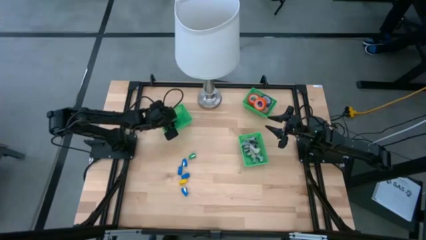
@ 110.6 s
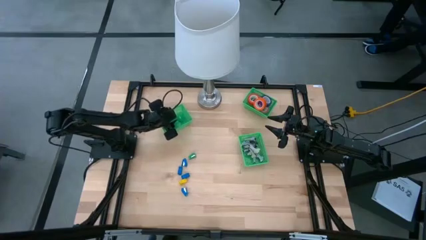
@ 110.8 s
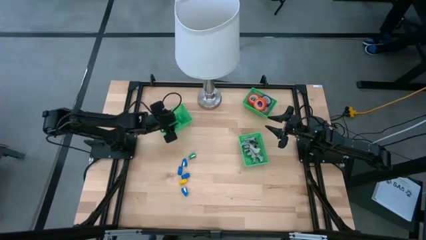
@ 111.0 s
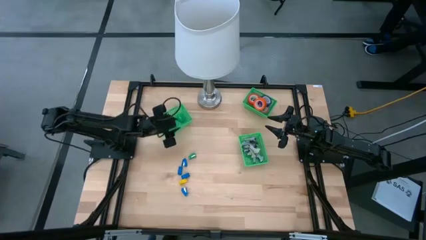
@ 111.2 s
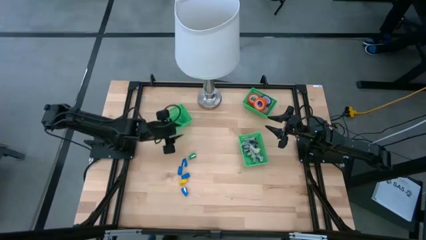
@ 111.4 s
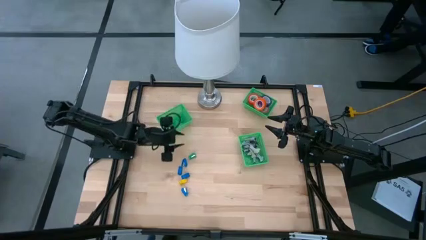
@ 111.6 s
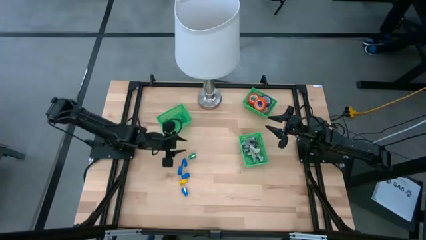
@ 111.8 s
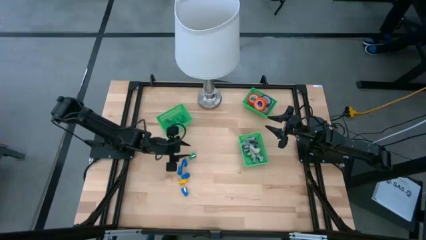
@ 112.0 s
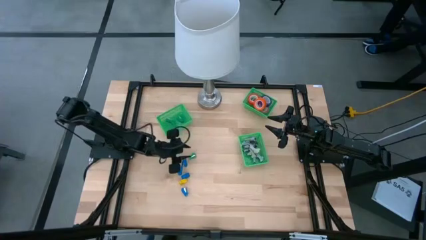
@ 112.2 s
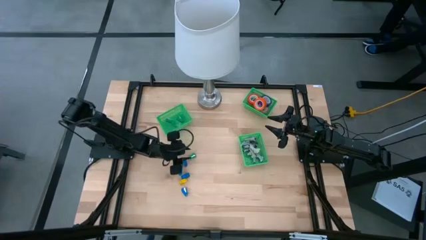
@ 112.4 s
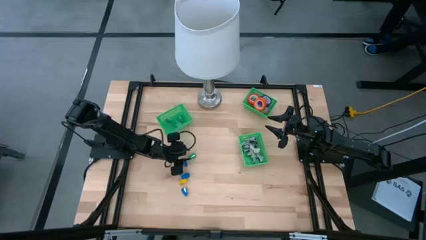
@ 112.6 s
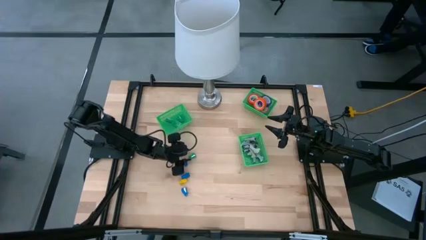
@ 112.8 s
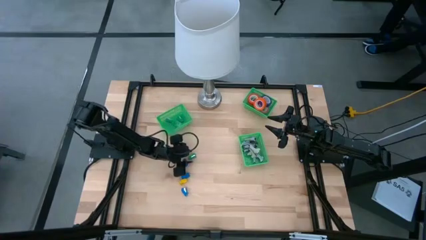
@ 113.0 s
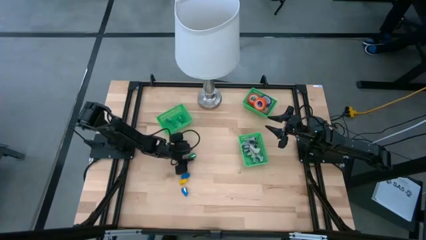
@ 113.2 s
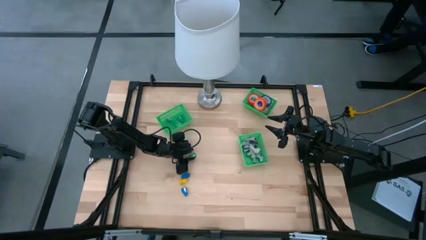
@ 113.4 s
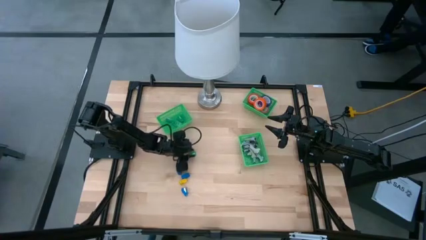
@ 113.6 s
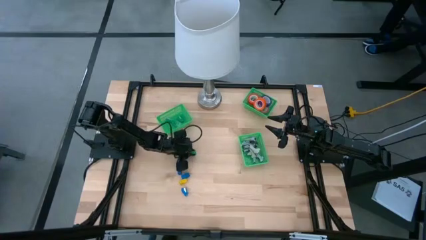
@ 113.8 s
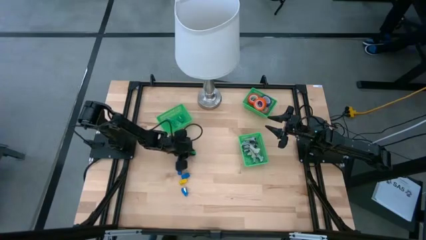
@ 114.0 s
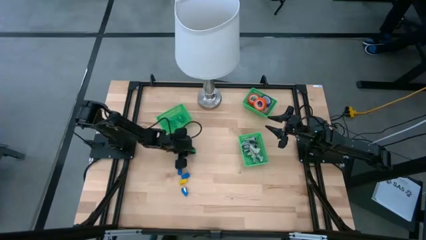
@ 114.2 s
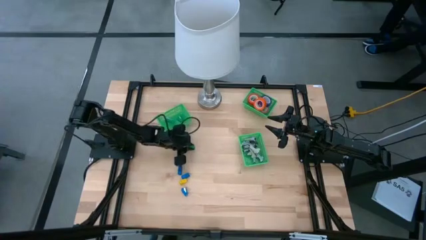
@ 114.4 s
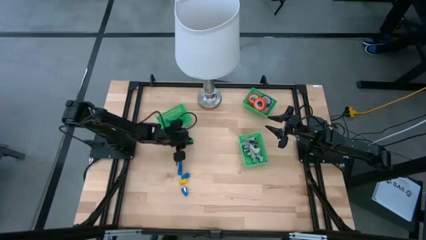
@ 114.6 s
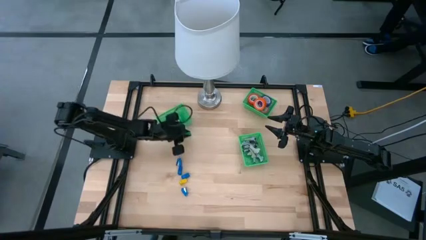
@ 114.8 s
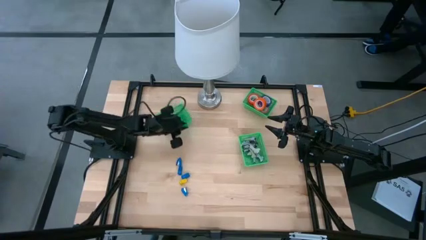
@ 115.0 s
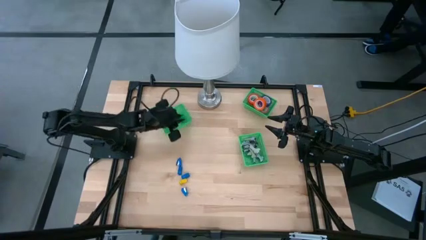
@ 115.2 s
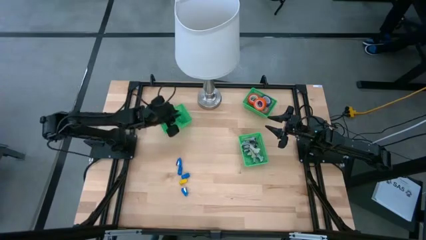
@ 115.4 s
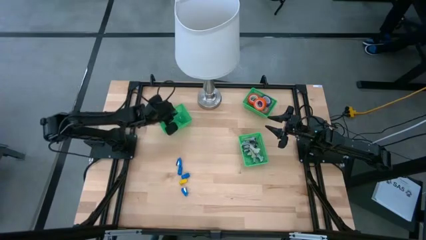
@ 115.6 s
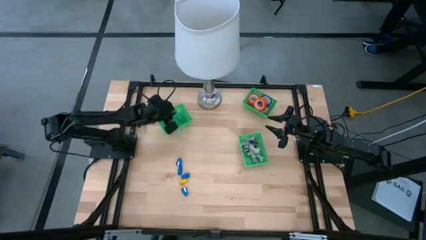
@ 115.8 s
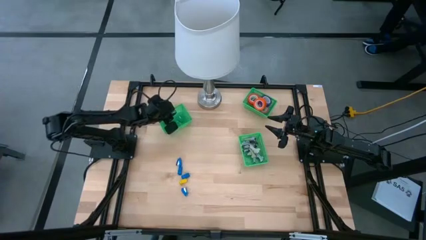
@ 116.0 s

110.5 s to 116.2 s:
Task: Pick and place Stapler, Stapler remover, tape
Put the green stapler into the left green bin

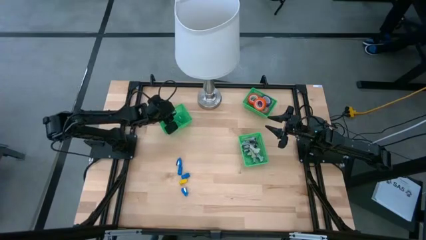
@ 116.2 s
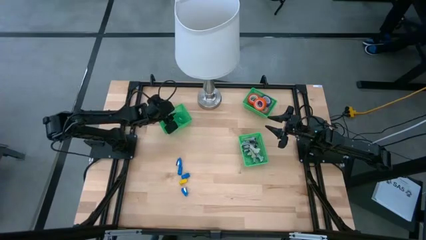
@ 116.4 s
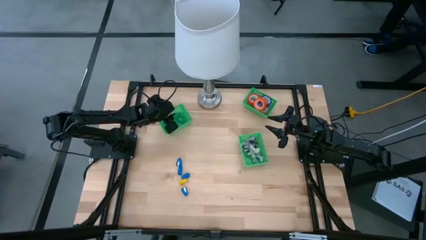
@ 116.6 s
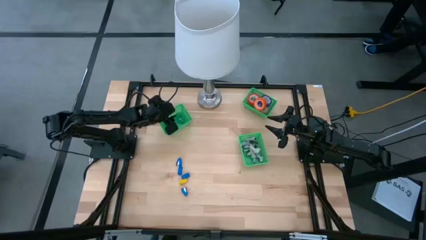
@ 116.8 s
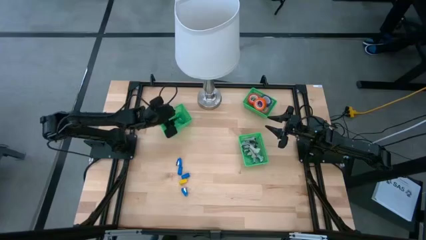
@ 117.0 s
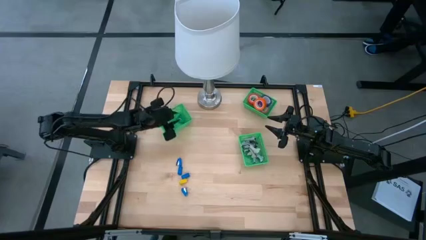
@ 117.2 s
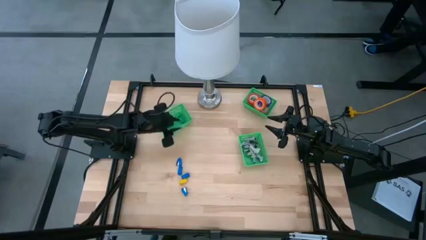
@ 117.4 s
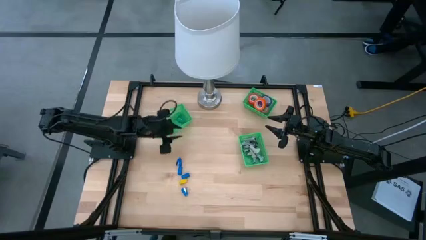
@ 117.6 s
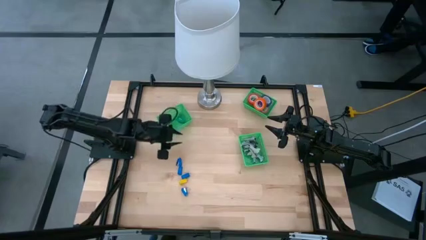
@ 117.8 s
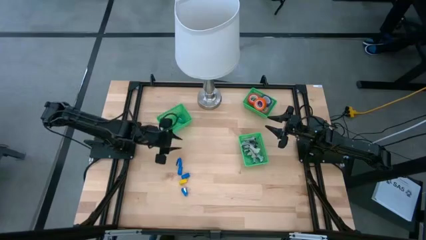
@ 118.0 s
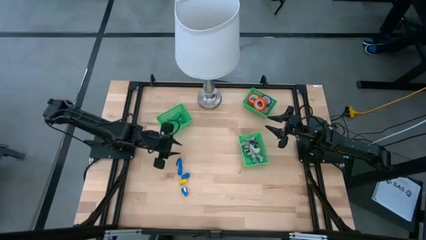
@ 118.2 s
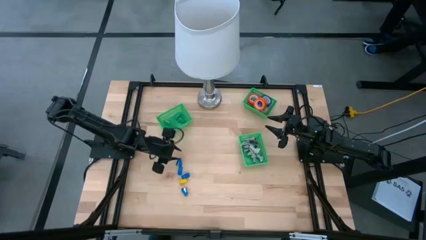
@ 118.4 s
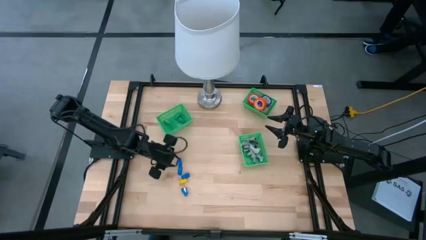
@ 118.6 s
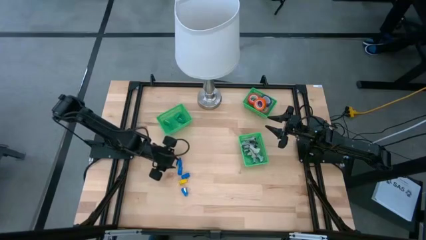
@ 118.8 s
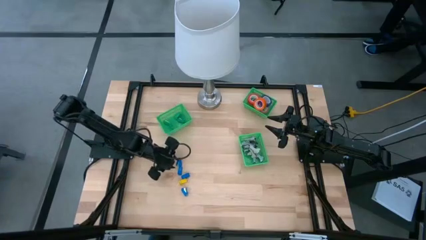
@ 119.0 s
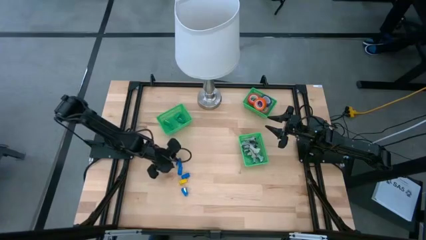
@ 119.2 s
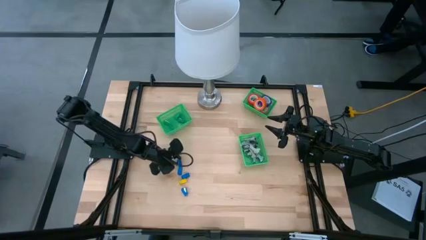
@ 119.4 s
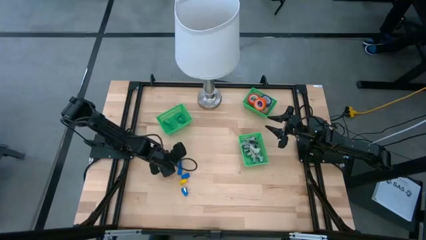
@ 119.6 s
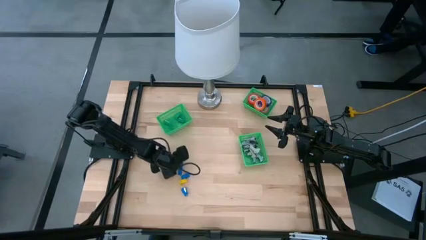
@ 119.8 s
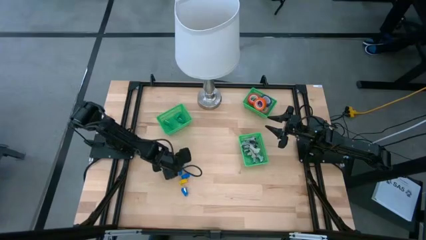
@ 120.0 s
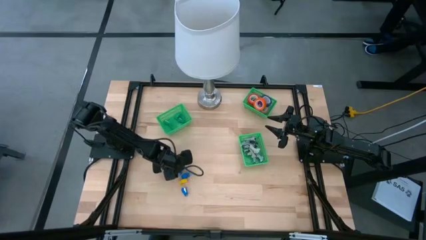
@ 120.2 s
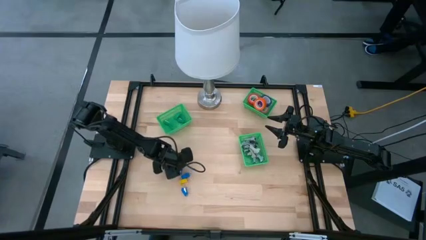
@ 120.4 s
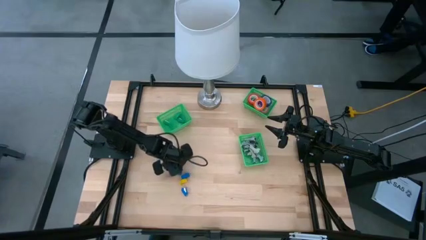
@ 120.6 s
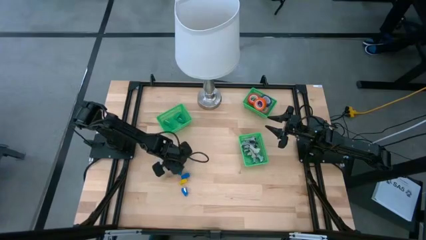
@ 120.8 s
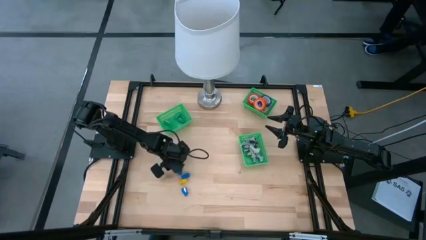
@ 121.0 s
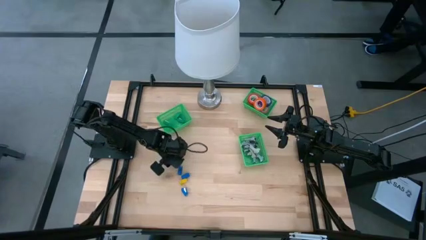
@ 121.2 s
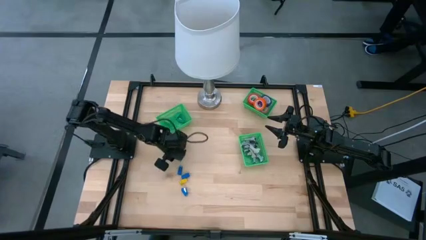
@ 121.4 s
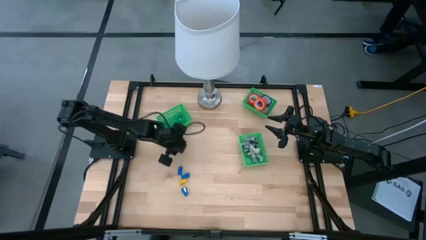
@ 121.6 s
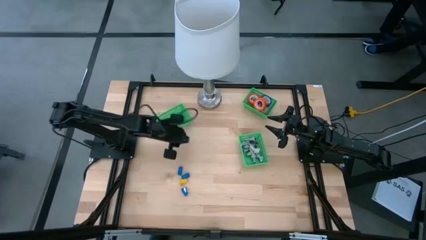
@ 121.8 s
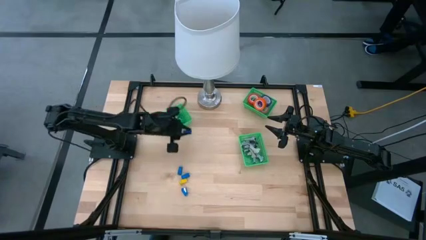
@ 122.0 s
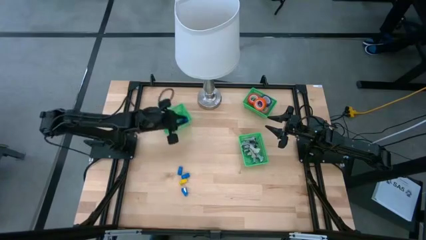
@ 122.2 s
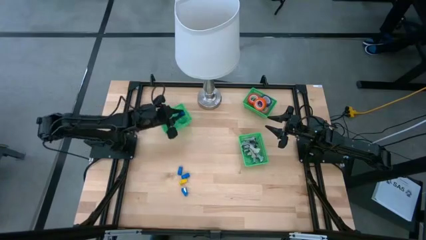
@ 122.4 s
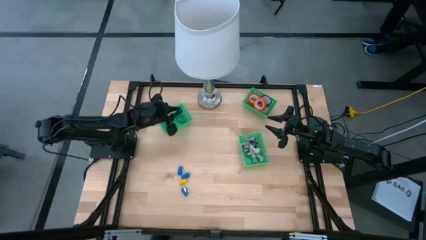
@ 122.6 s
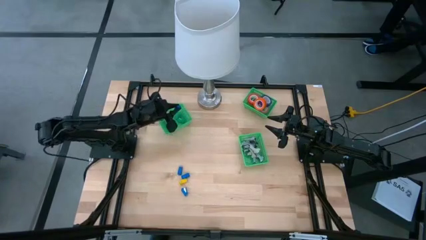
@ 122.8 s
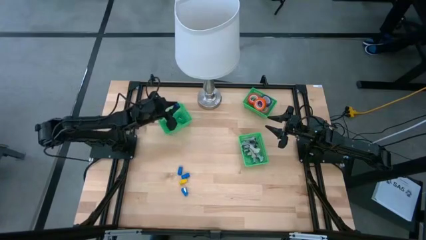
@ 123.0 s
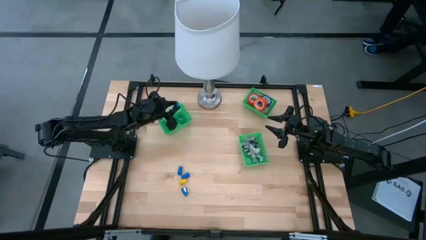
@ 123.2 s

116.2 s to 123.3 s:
Put the blue stapler into the left green bin

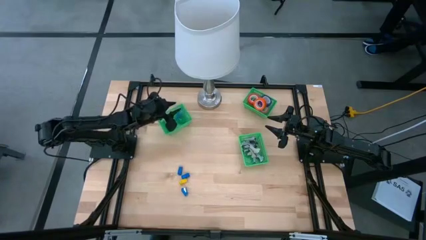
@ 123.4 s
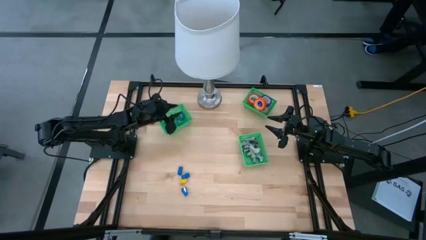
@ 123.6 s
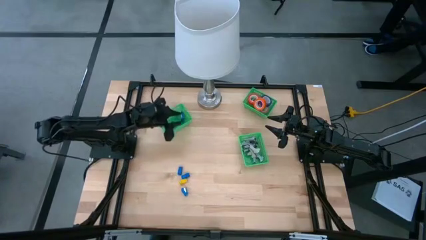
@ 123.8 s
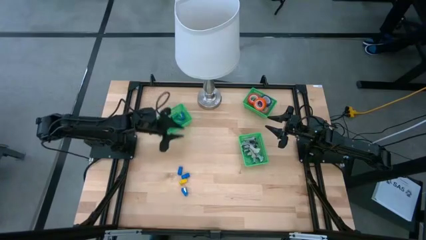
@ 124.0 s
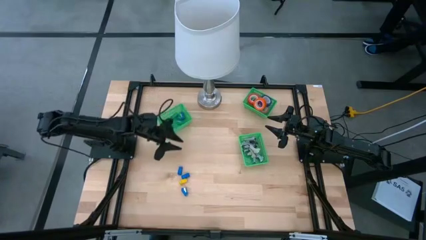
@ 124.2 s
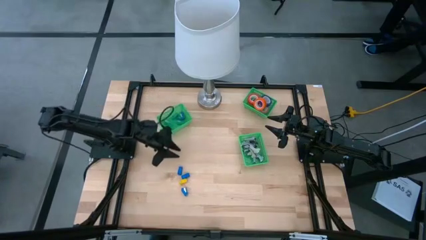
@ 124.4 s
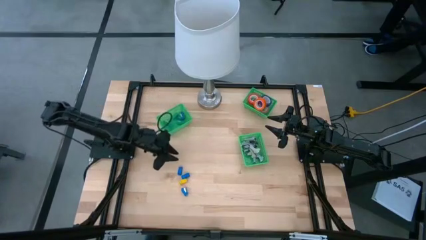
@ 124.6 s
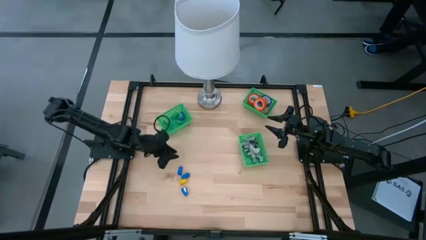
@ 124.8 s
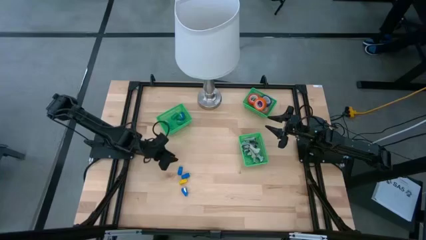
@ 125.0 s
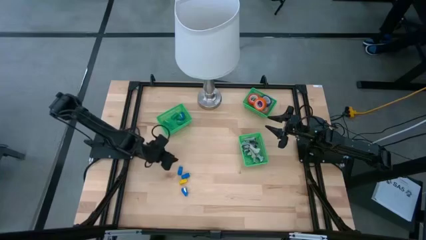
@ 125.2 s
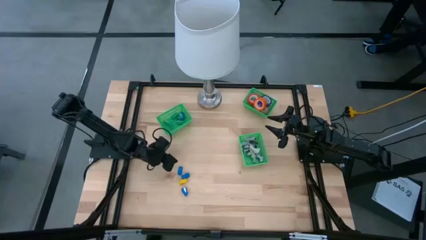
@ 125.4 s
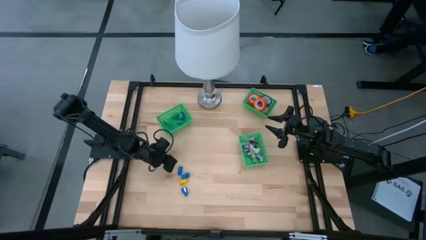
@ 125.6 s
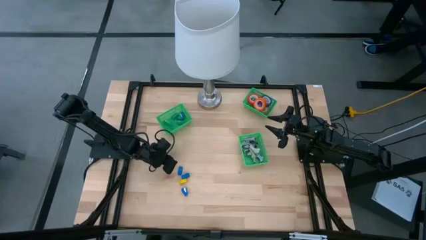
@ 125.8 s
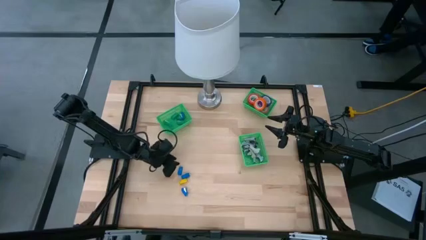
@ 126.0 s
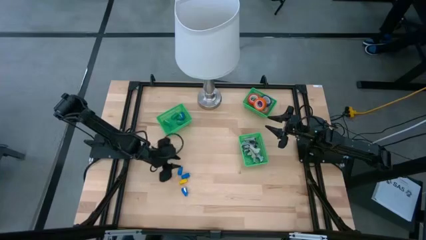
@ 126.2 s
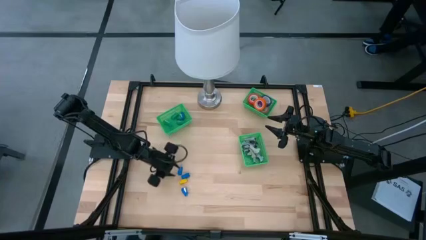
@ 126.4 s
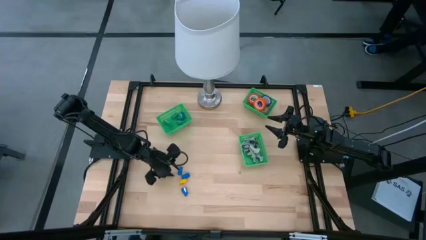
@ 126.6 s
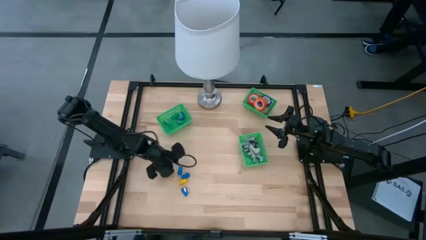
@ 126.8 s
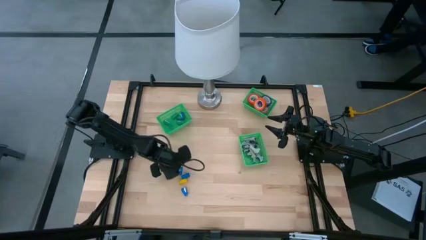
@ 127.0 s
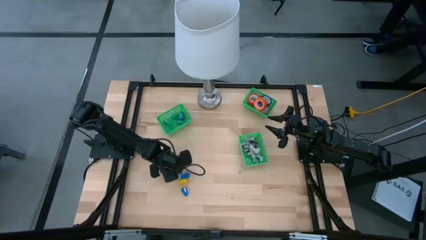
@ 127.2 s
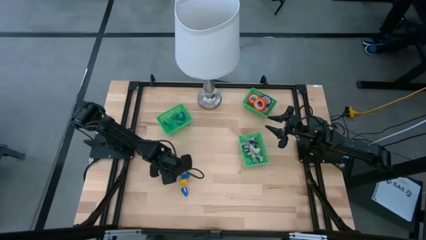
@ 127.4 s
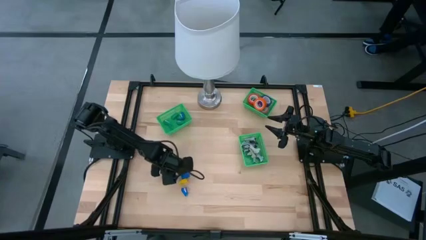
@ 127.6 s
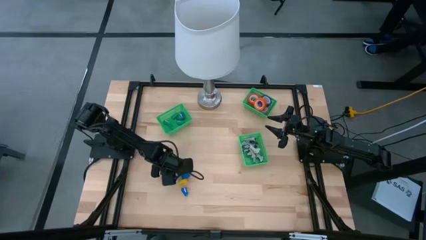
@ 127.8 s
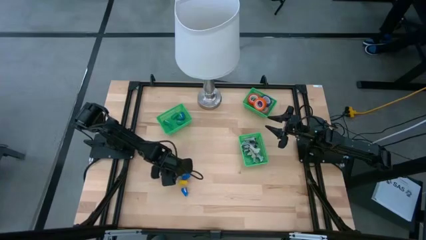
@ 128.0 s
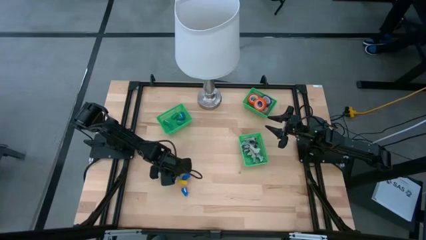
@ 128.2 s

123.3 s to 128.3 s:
Put the blue stapler into the left green bin
